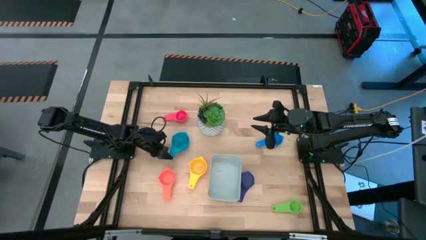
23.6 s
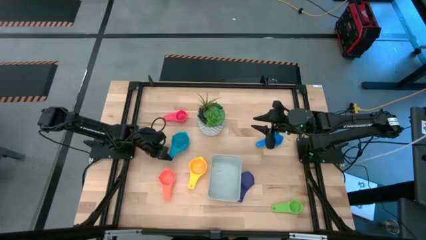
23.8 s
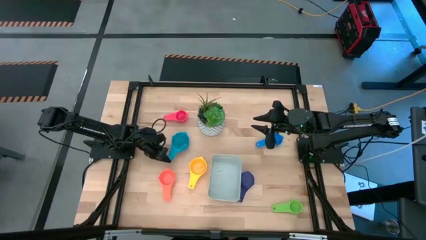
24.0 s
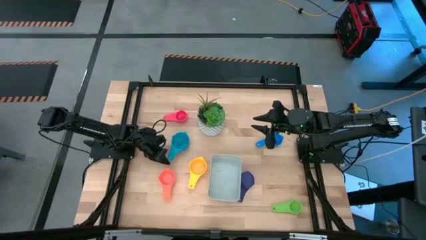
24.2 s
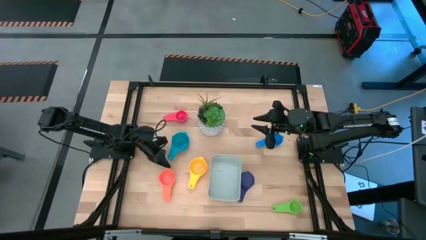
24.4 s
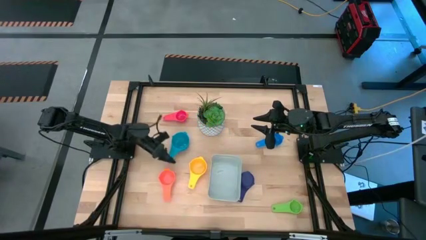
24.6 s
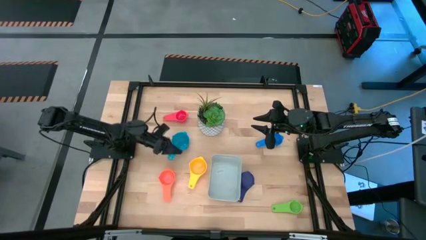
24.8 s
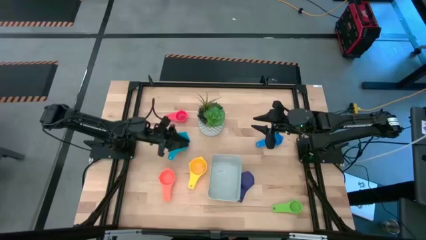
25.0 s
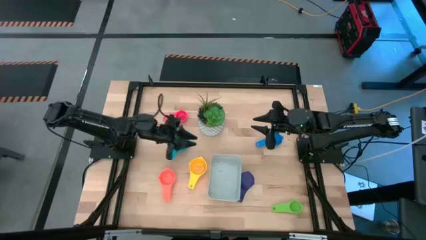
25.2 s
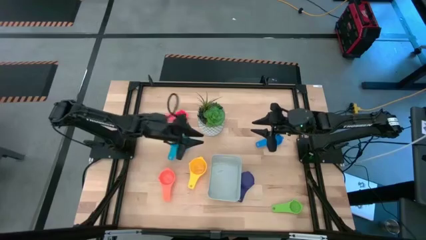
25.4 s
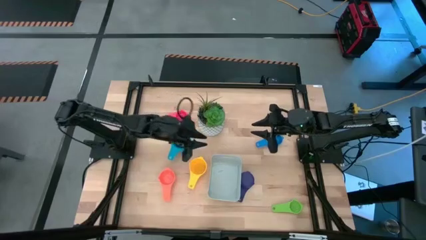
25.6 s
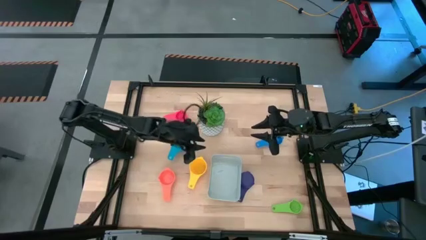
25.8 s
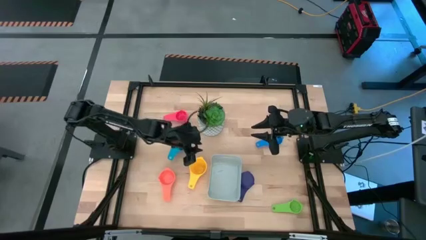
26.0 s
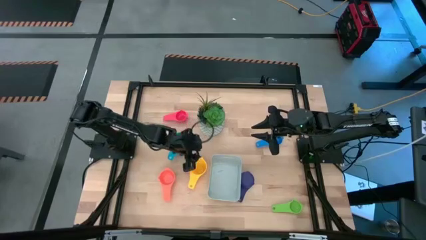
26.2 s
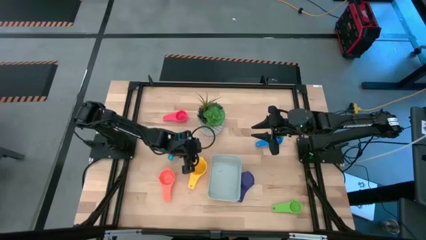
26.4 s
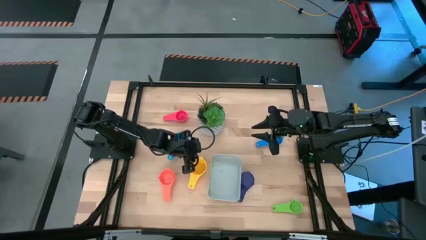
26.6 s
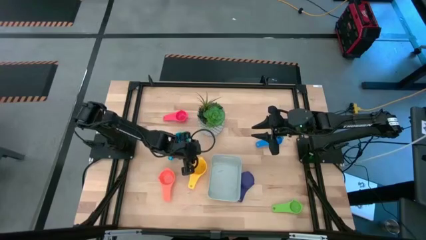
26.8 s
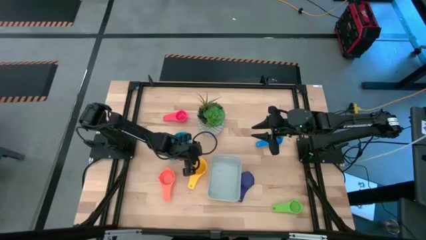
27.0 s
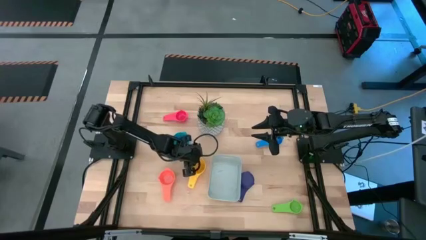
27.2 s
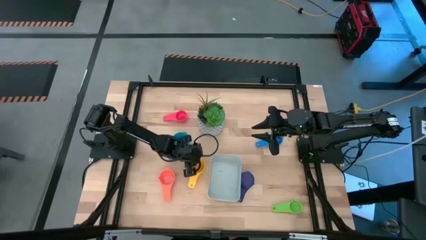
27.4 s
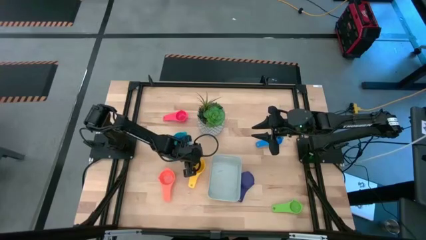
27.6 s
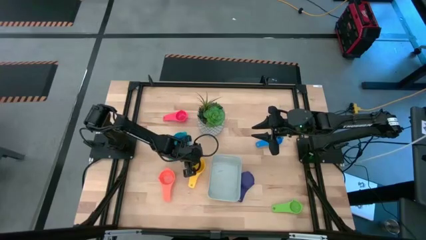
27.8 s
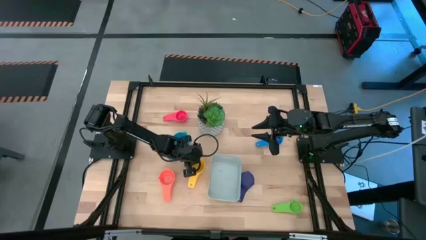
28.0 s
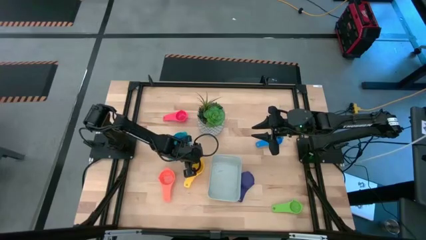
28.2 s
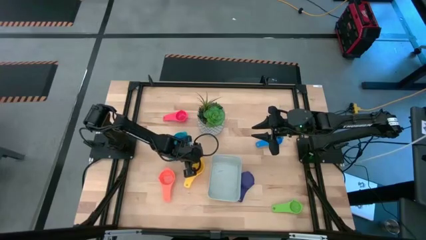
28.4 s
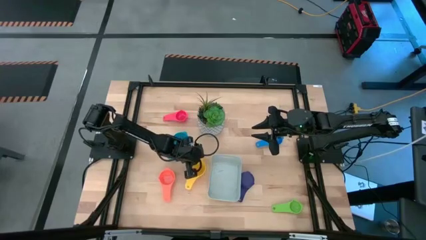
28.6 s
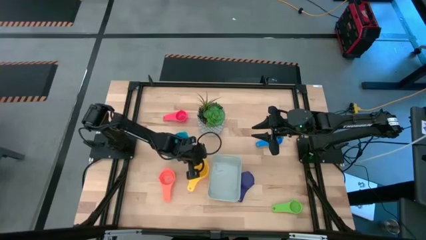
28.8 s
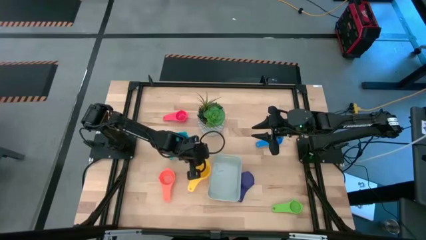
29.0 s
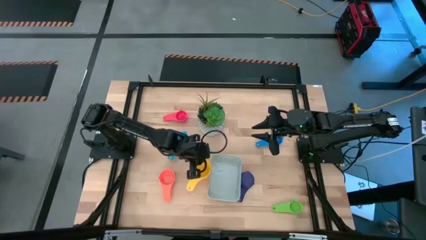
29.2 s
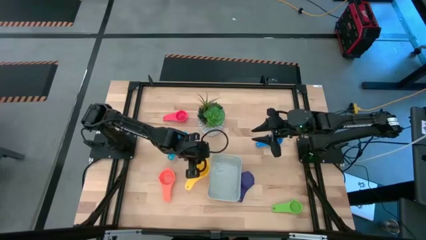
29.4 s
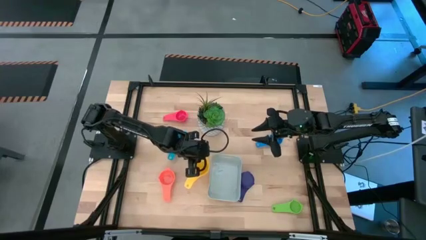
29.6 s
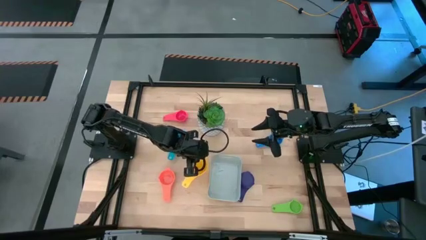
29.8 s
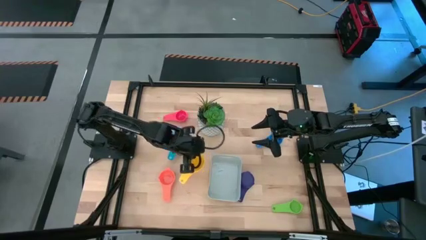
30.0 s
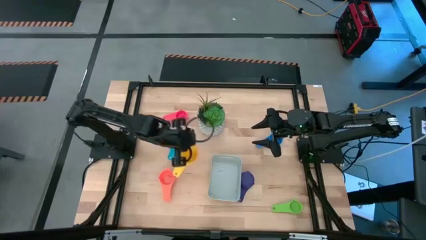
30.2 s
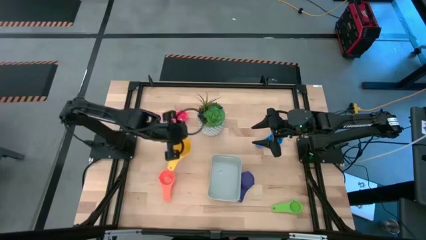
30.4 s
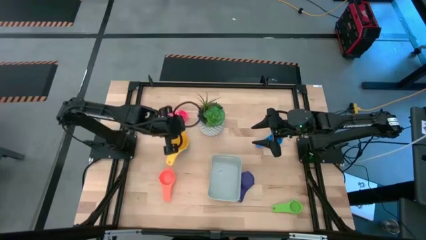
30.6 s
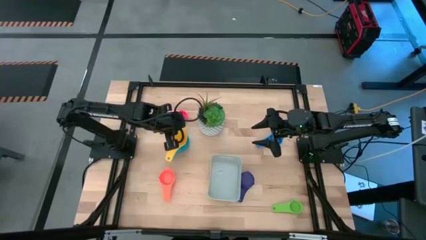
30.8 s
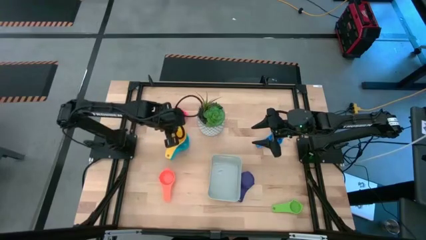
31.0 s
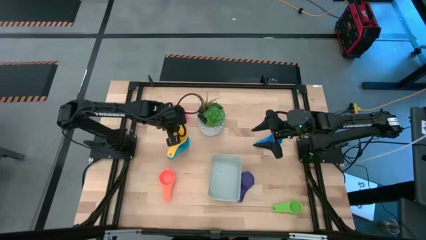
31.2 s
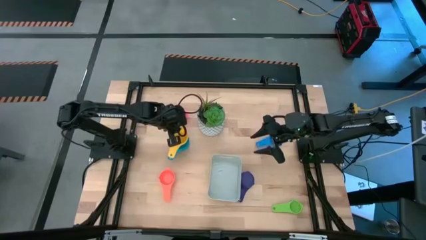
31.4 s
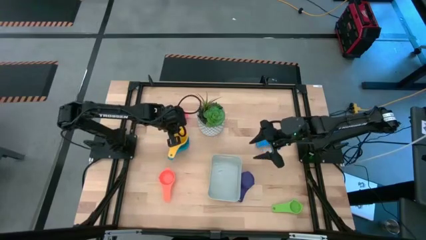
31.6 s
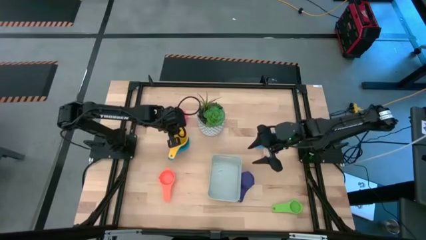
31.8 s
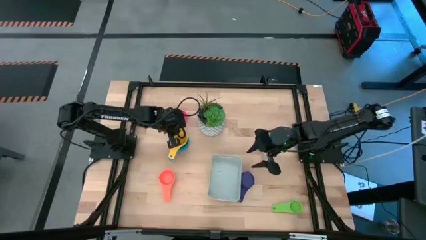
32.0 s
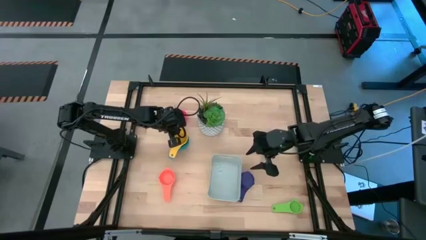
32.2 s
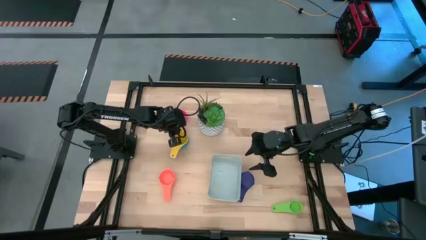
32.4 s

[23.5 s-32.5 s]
Task: Nest measuring cups in basket
Stack the yellow measuring cup on top of the light blue measuring cup

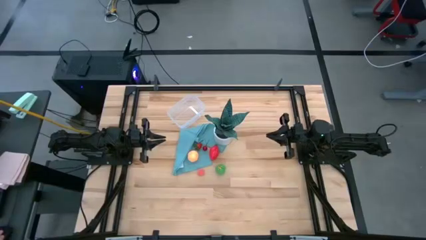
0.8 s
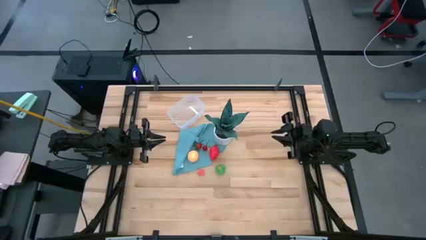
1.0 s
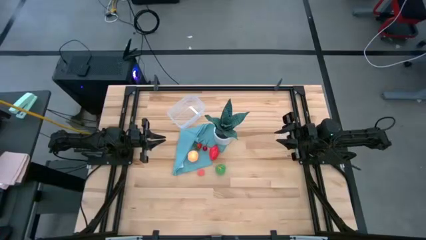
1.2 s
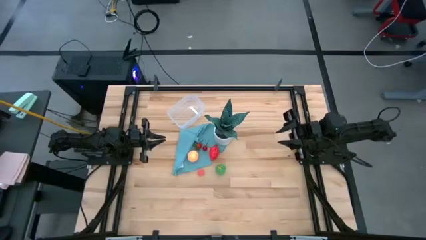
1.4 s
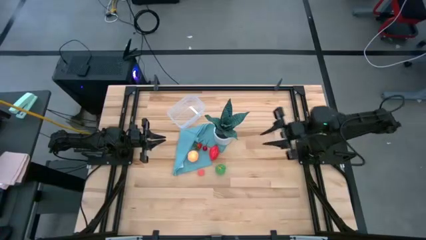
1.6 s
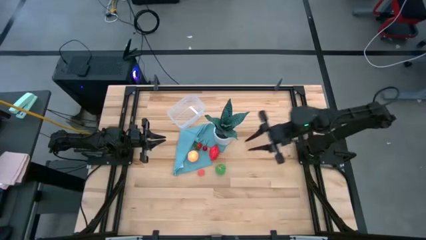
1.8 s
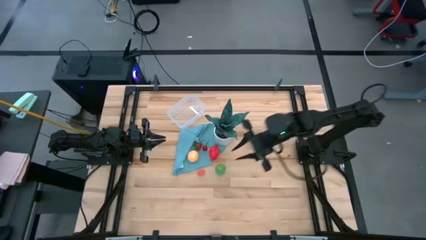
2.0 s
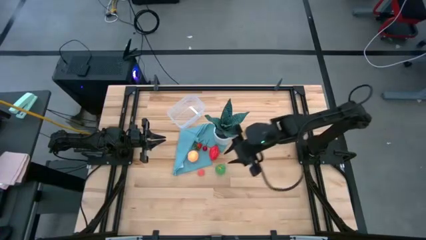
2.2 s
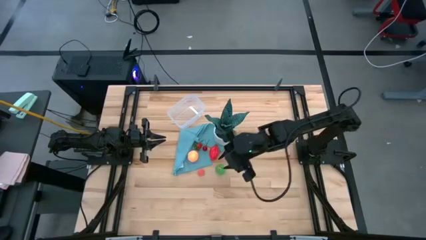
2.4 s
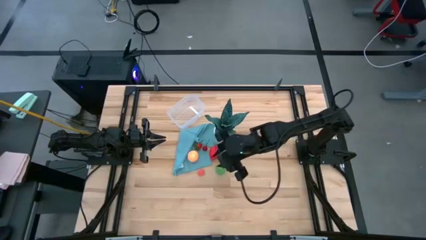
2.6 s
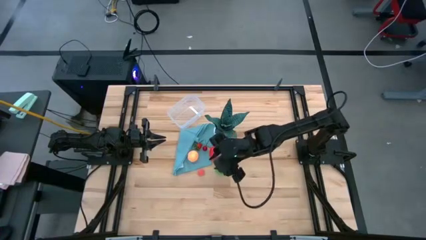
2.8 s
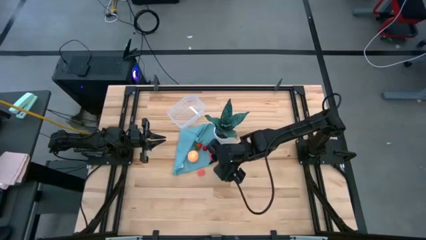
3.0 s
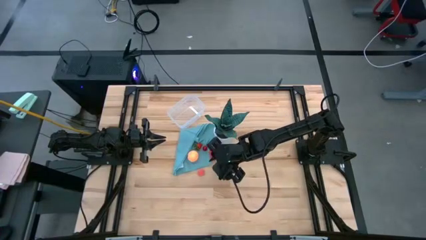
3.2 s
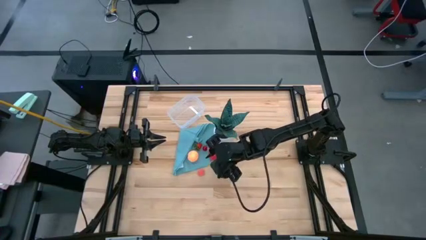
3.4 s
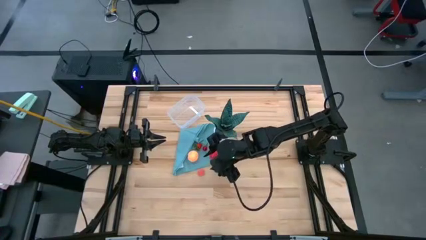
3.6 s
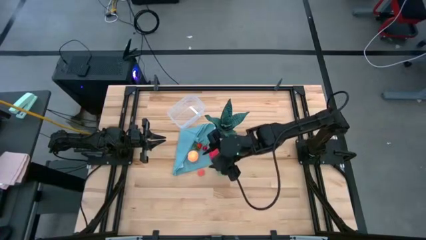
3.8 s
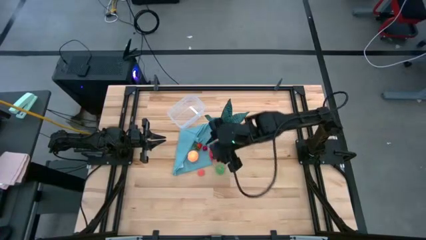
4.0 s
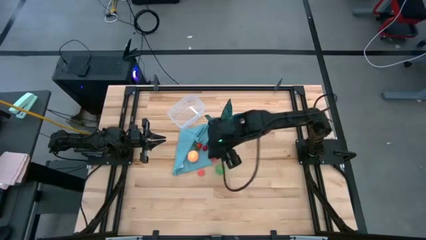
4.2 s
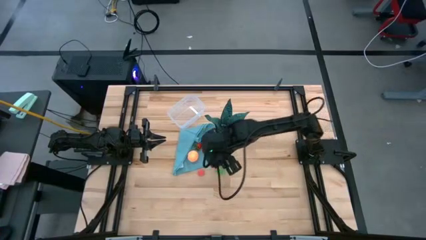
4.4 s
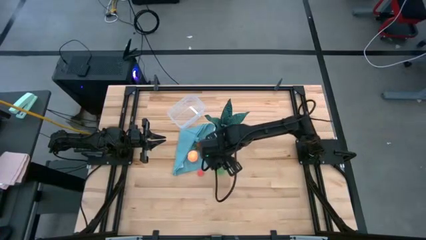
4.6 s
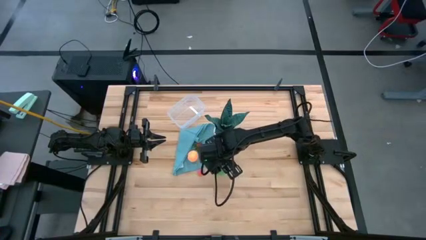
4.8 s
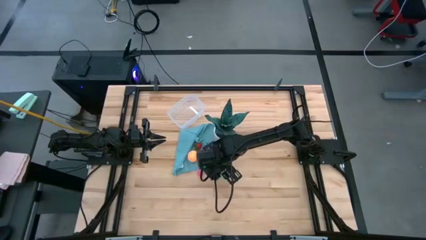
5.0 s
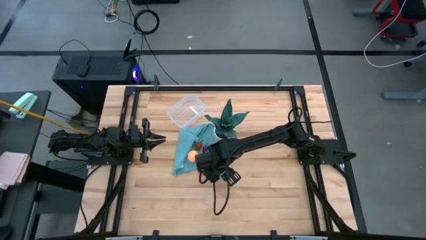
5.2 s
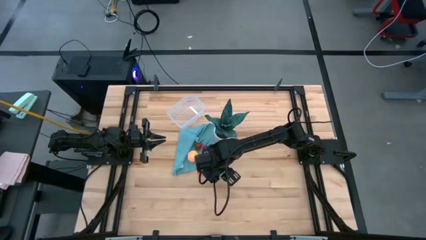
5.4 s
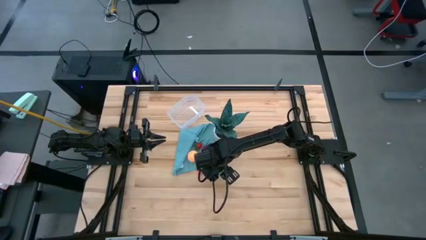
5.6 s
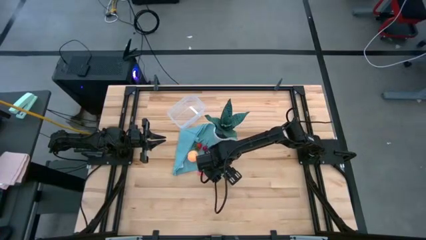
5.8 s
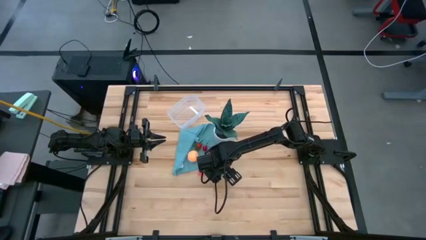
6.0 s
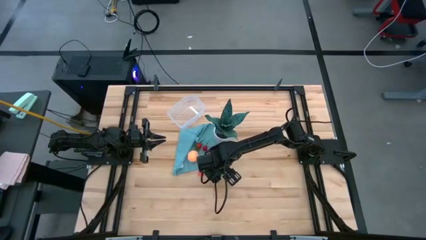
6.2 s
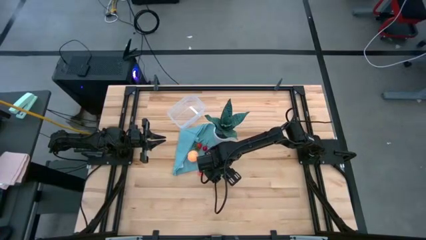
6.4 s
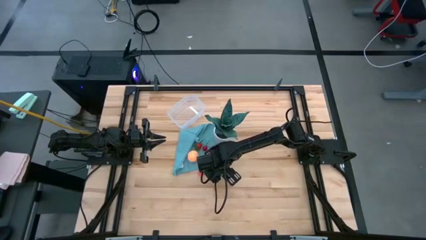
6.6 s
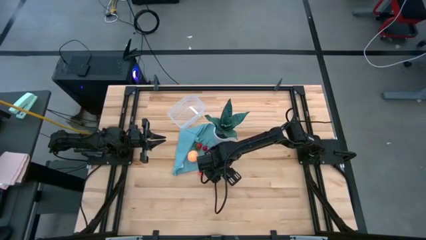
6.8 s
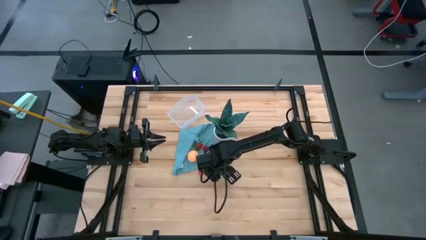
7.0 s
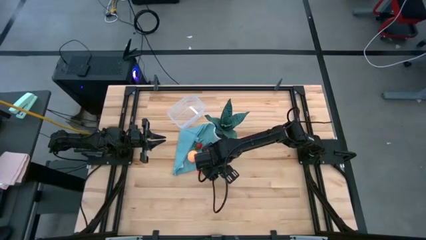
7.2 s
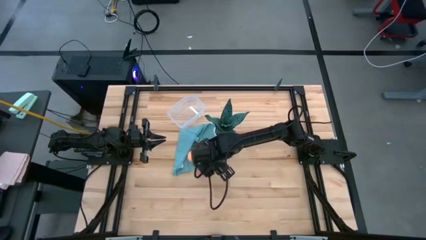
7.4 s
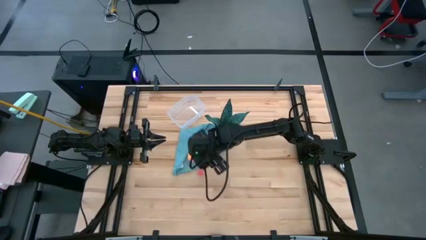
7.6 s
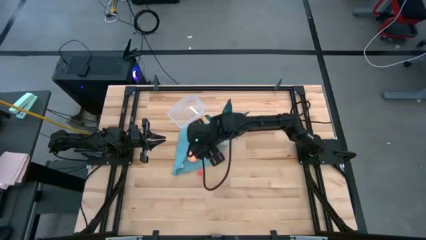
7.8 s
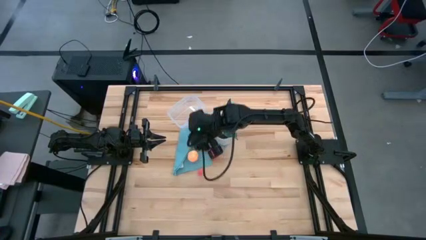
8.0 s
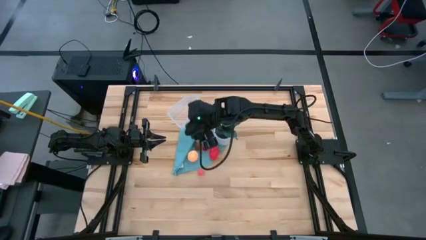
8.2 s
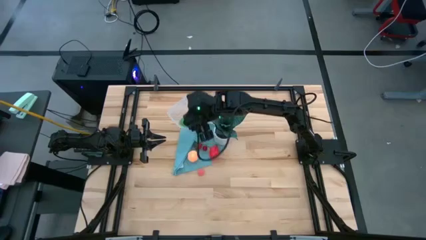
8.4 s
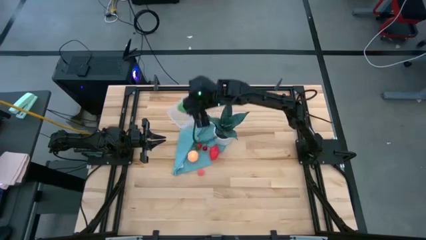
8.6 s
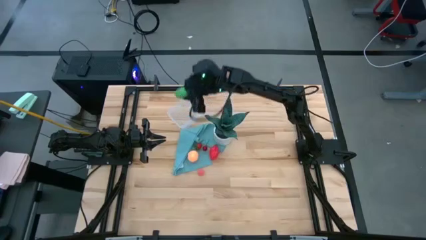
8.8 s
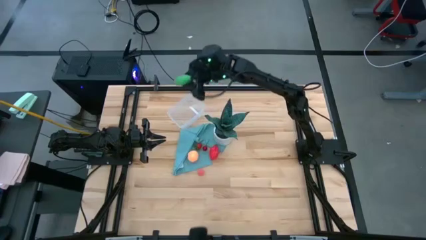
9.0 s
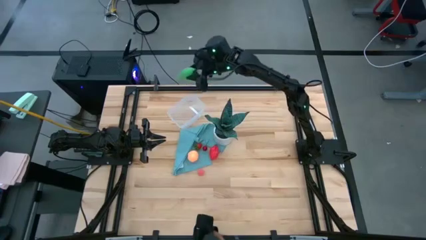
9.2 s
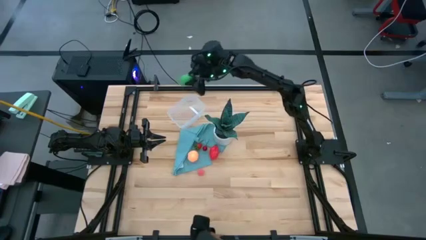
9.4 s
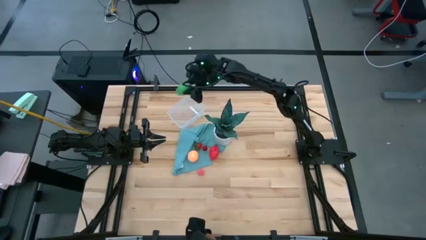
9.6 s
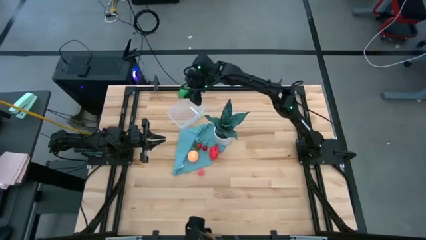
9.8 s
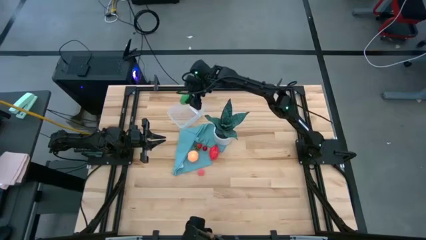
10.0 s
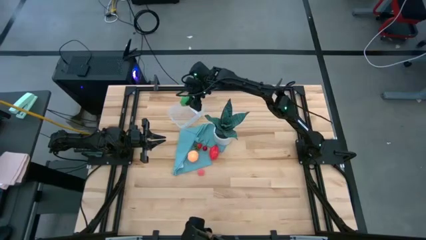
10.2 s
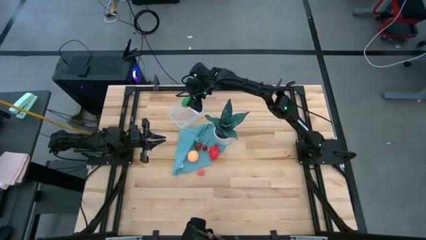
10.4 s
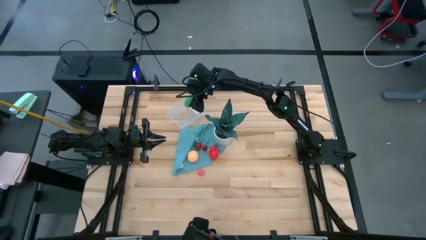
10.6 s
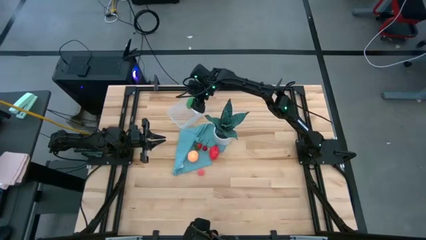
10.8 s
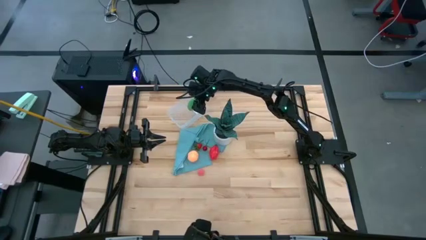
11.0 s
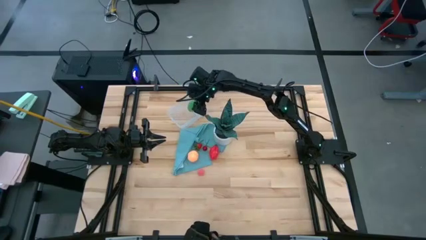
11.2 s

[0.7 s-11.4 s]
Task: Pick and placing Produce into tupperware
Put the corn into the transparent bin
